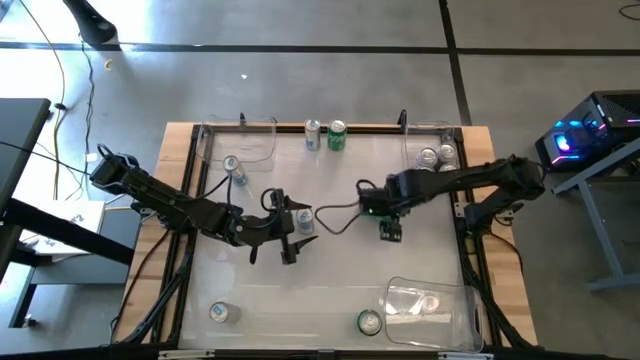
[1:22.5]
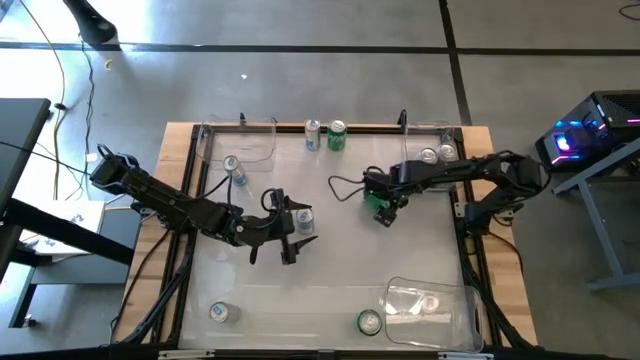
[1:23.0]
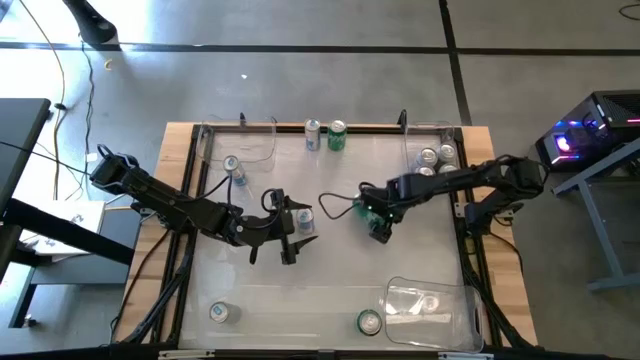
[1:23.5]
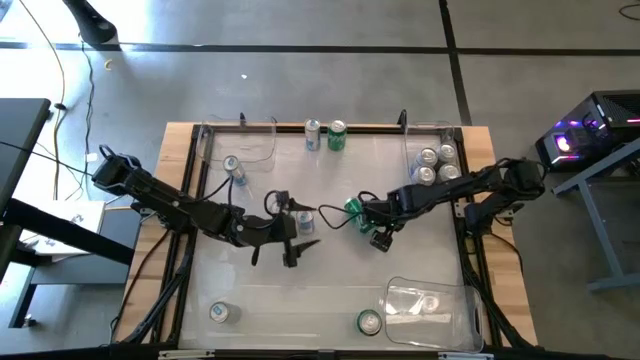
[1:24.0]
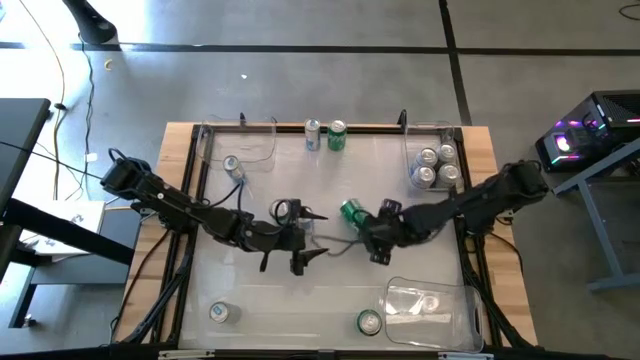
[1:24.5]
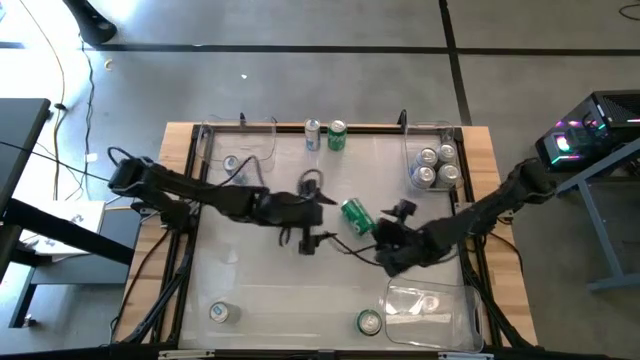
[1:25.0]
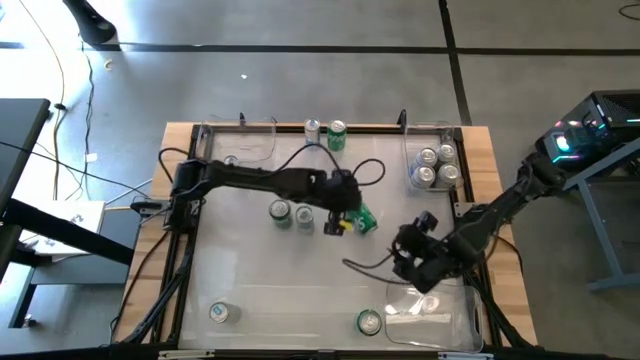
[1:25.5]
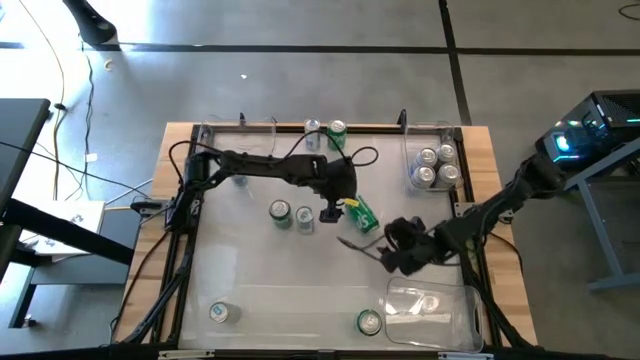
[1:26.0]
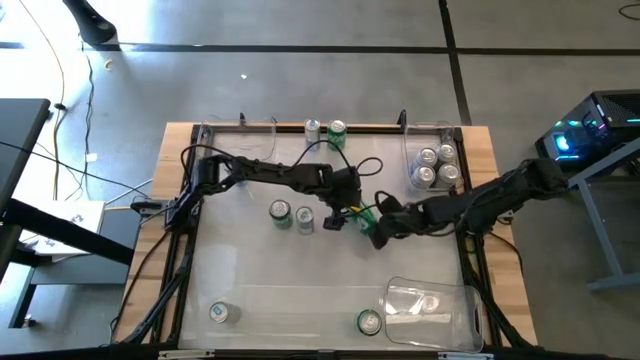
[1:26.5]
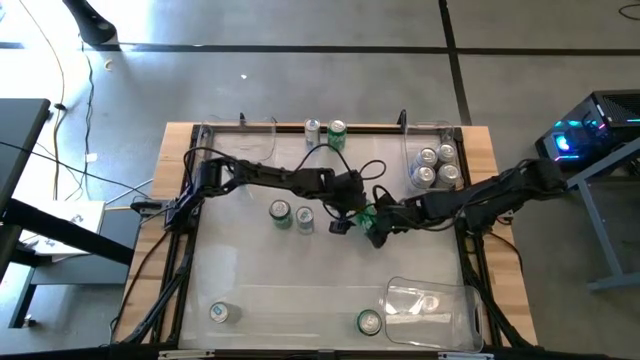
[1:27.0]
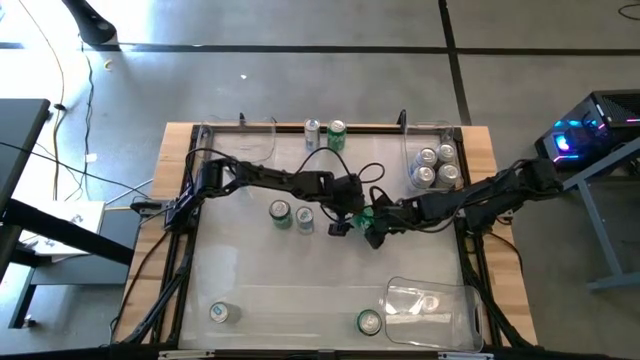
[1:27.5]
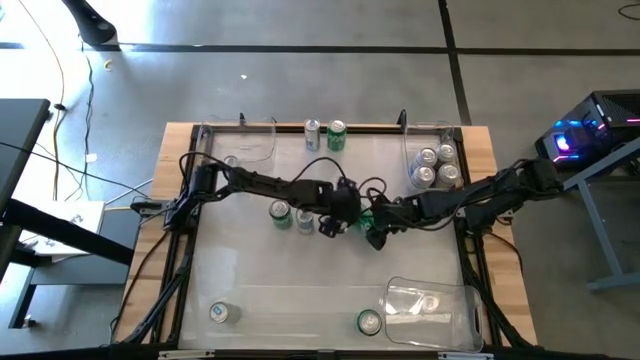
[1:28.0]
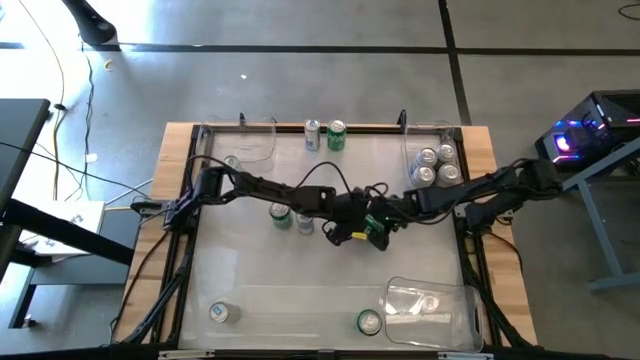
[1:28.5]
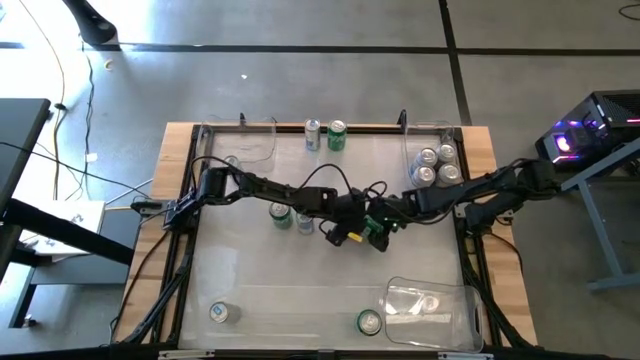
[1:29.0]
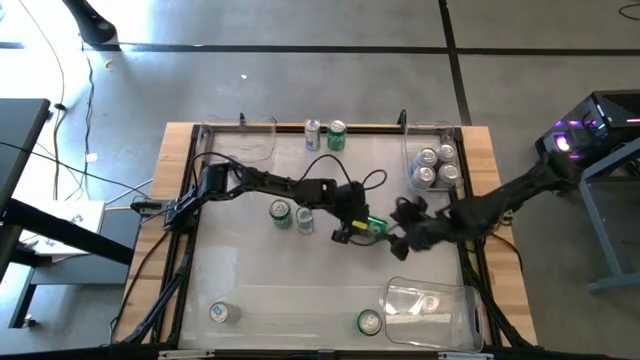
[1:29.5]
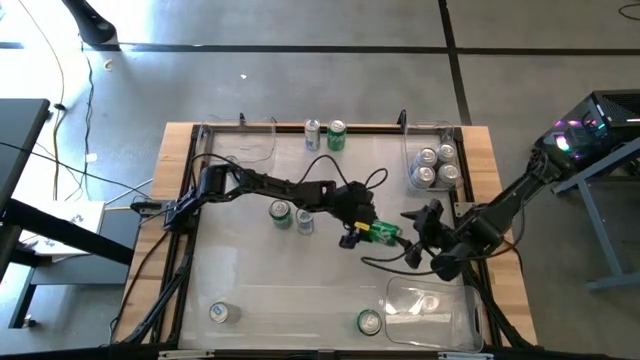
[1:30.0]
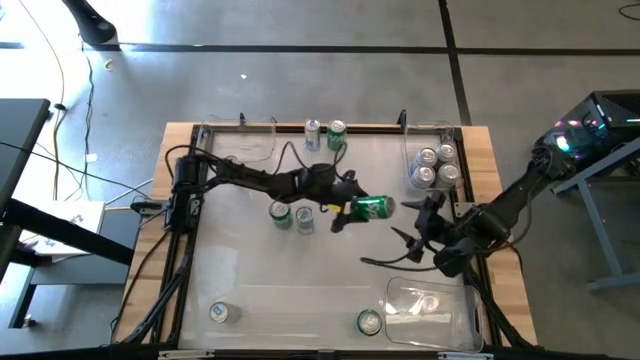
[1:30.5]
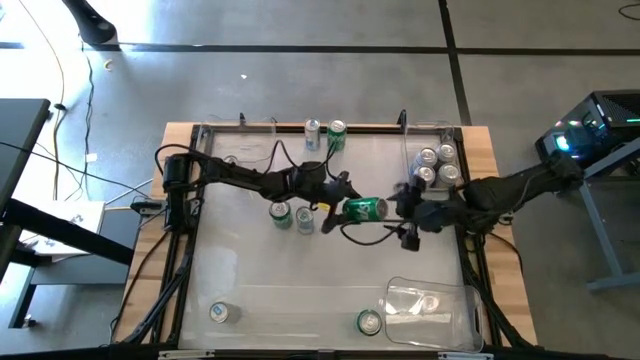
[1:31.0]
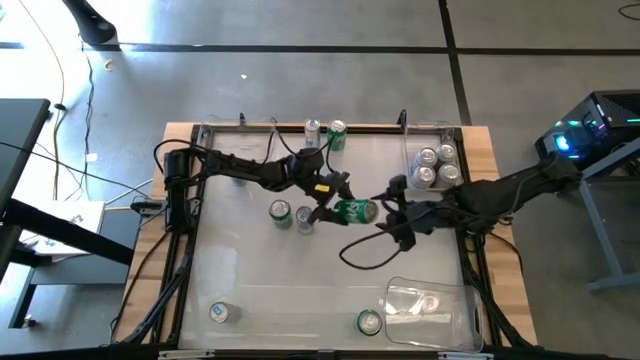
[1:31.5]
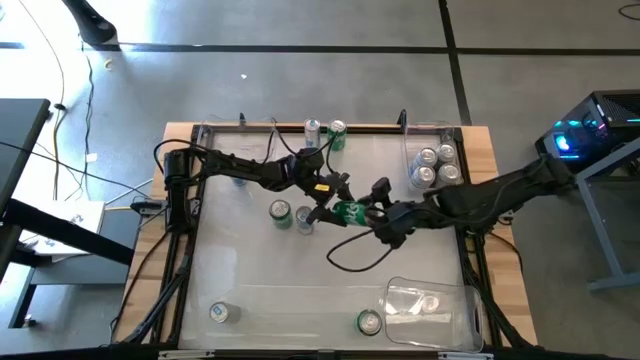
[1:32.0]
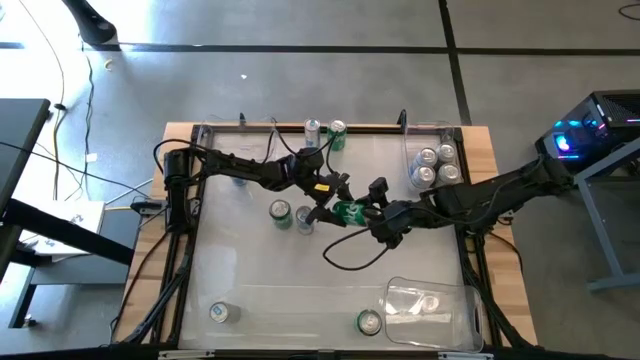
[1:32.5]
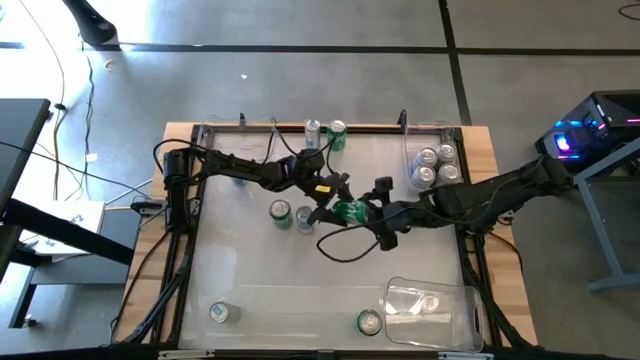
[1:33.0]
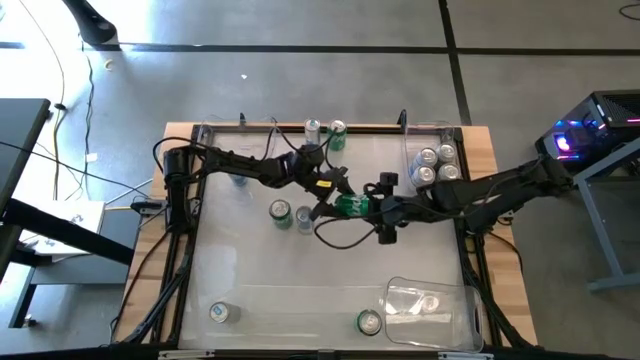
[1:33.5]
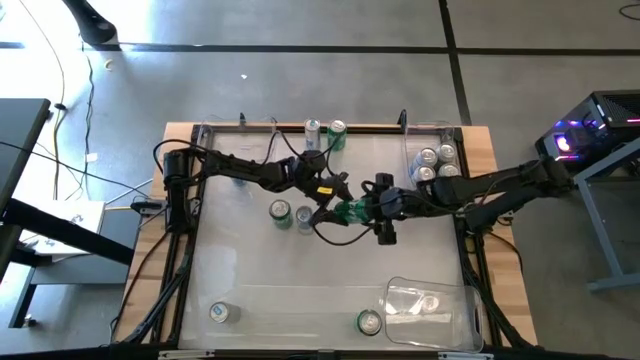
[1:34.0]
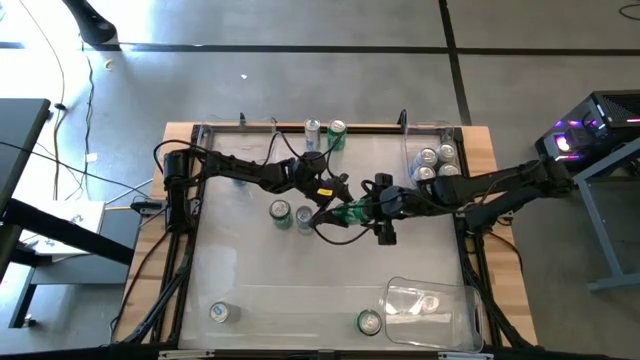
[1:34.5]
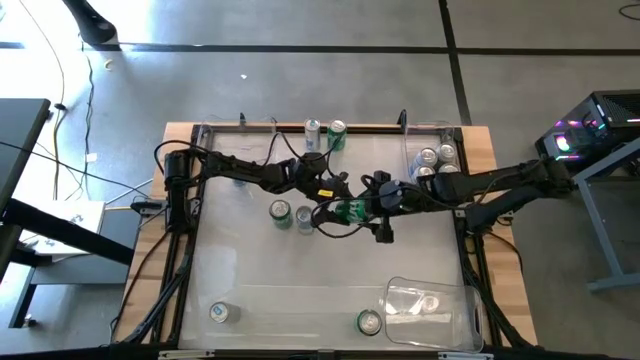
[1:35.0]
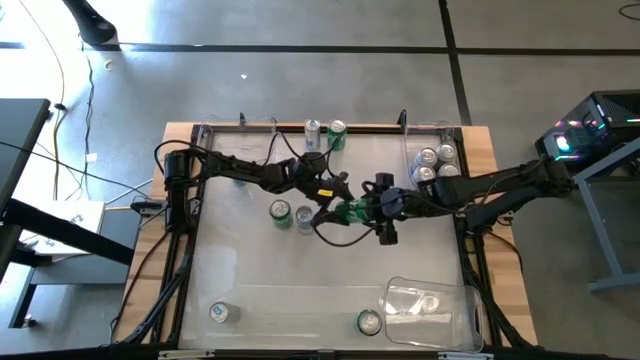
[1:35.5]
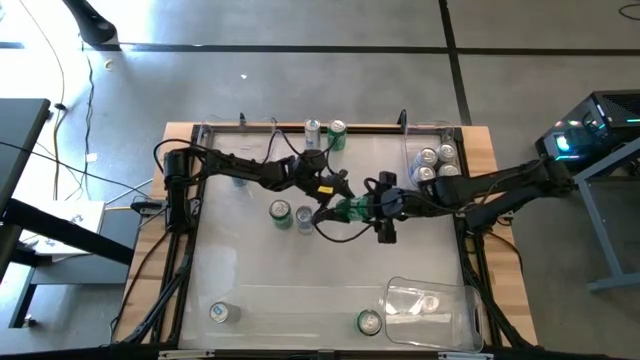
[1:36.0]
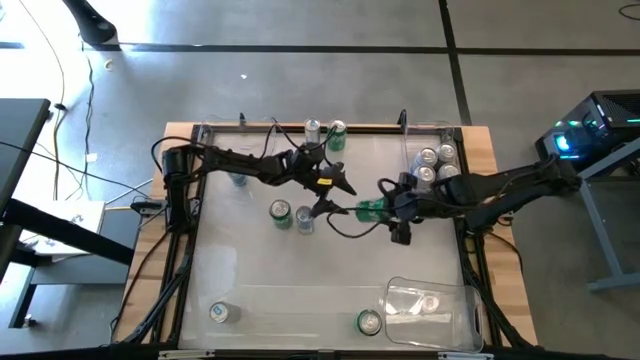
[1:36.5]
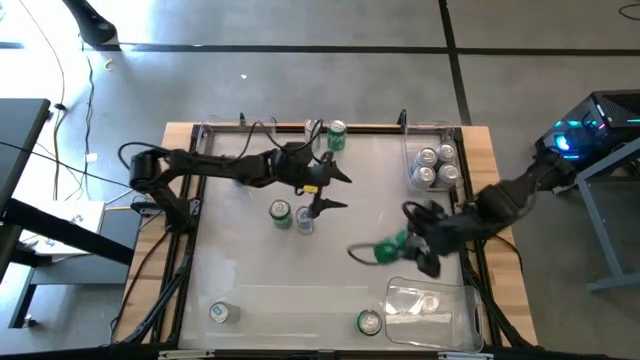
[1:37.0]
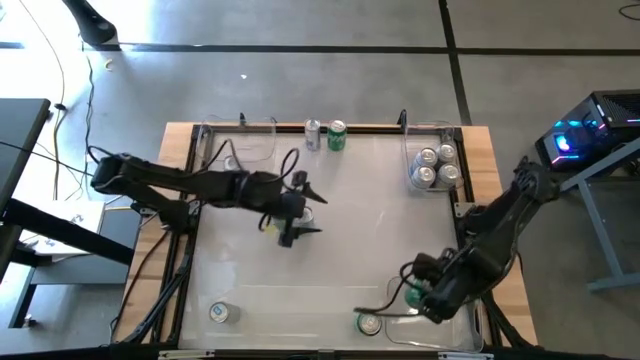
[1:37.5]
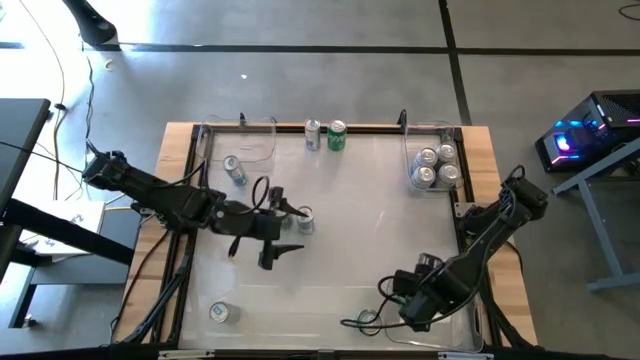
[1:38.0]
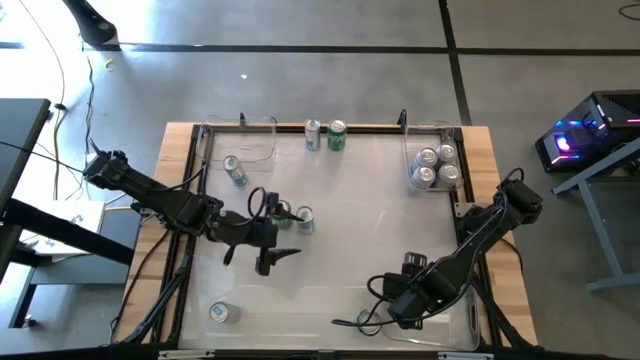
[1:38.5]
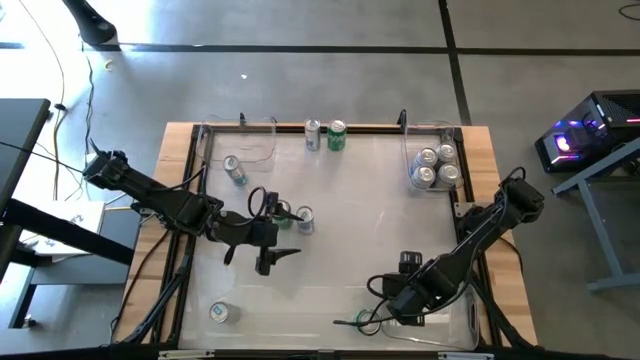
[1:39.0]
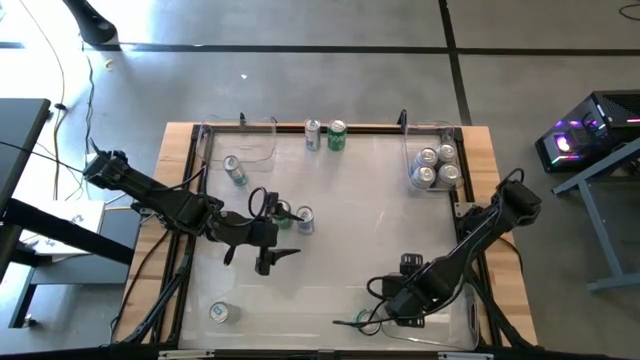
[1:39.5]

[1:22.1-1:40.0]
Task: Sort soda cans
Put the middle right green soda can into the bottom transparent bin

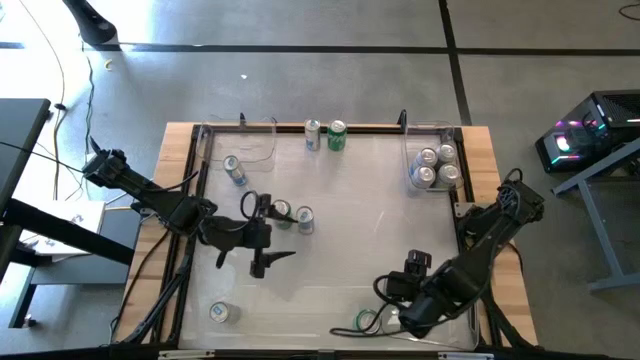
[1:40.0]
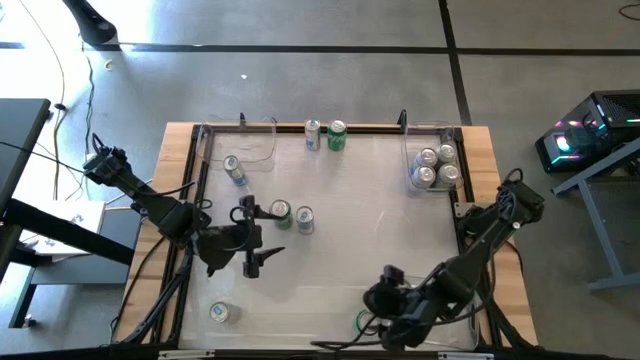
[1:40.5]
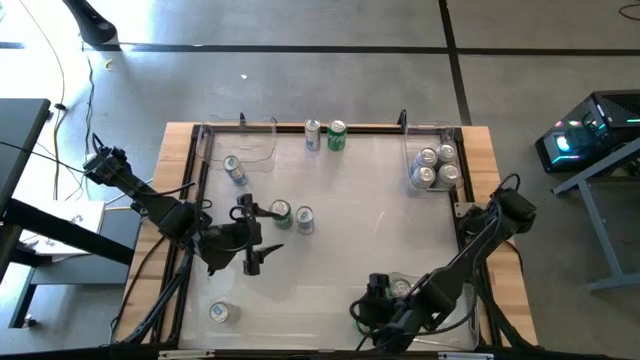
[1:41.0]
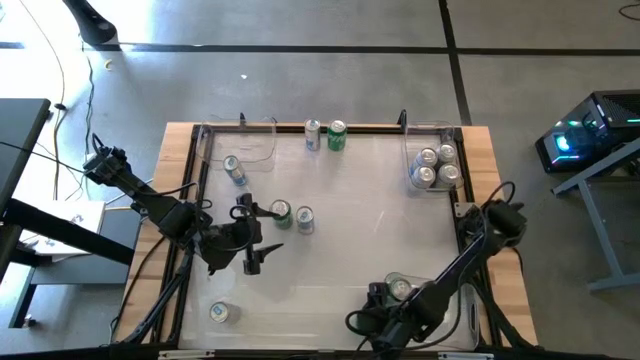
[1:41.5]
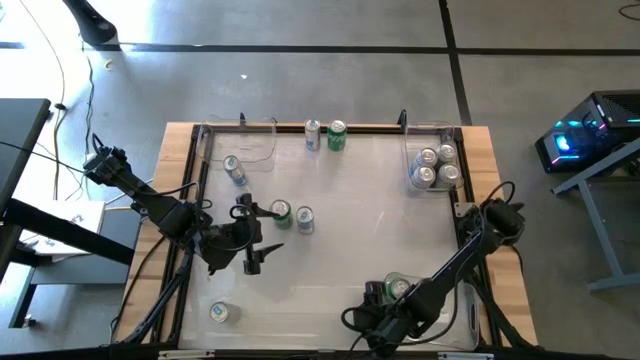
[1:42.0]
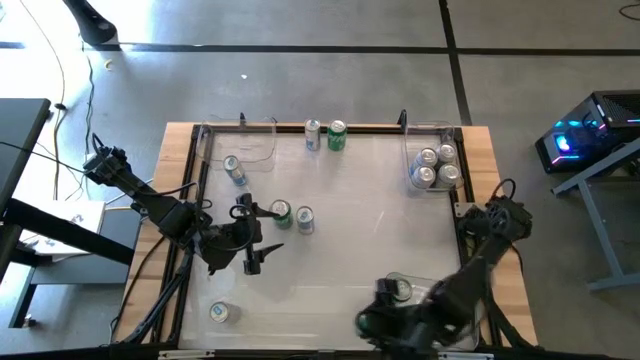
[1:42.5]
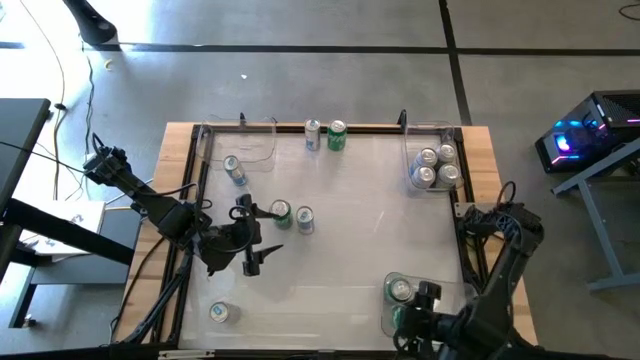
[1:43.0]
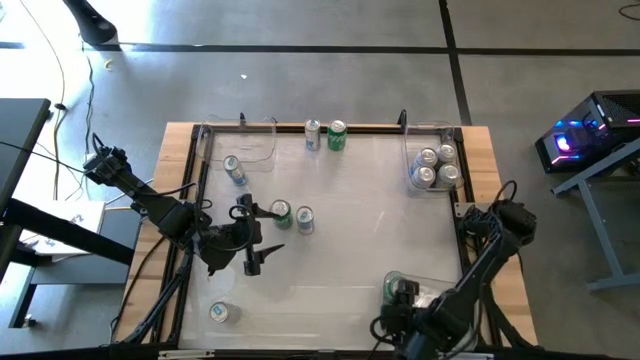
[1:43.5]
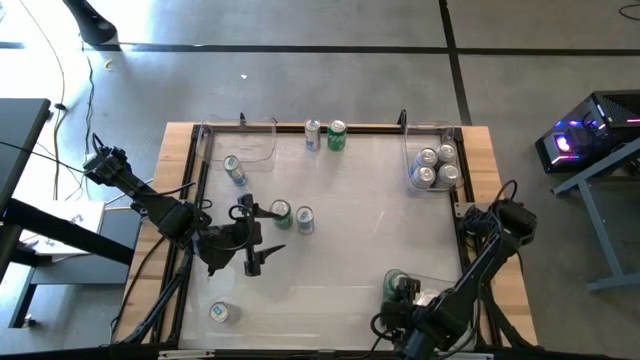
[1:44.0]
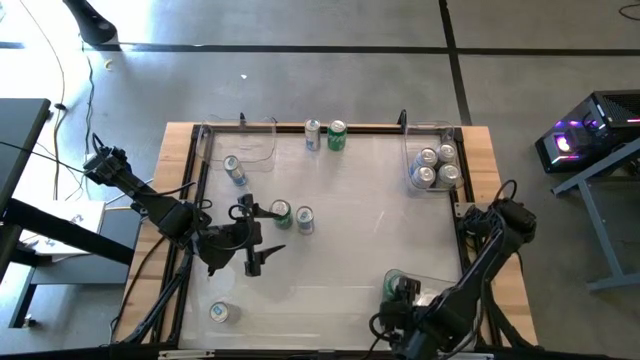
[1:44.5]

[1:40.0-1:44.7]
Put the bottom green soda can into the bottom transparent bin
